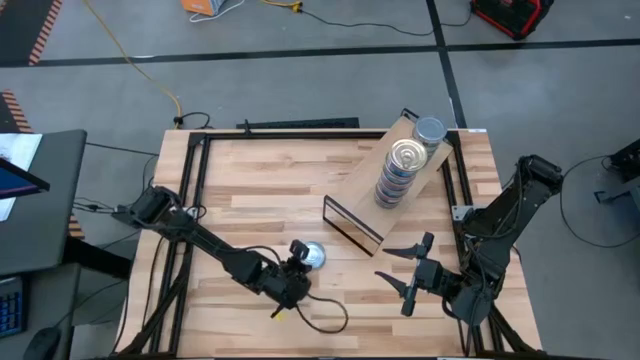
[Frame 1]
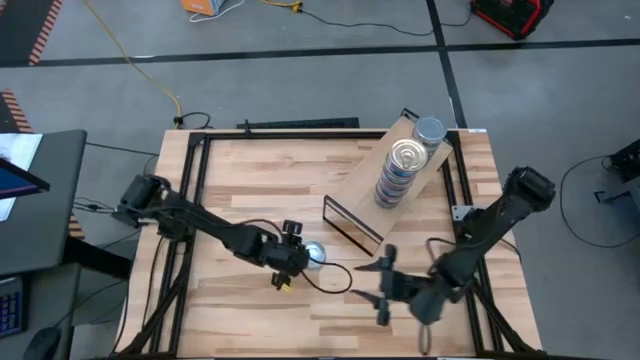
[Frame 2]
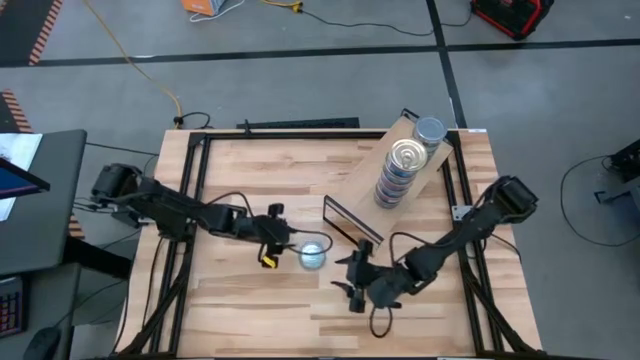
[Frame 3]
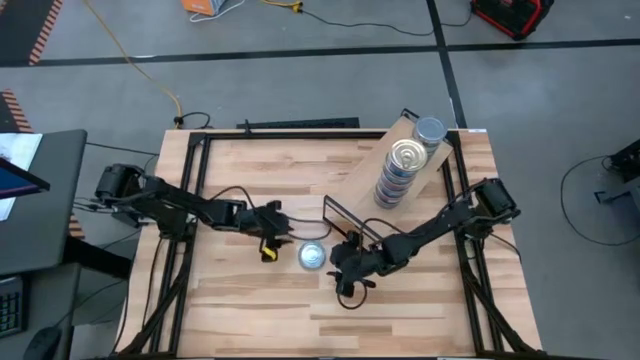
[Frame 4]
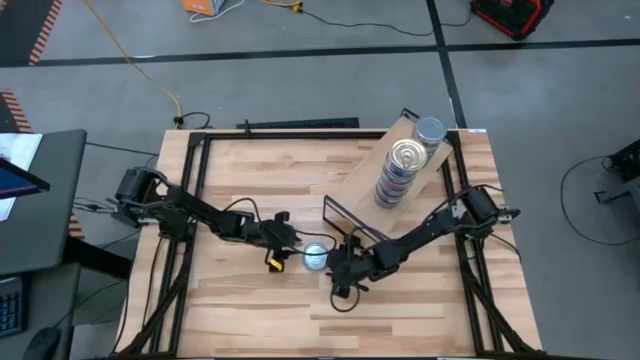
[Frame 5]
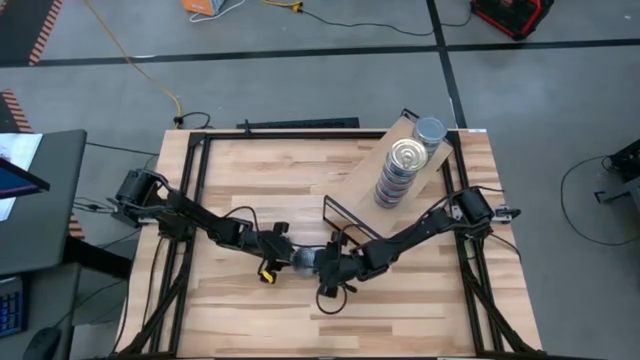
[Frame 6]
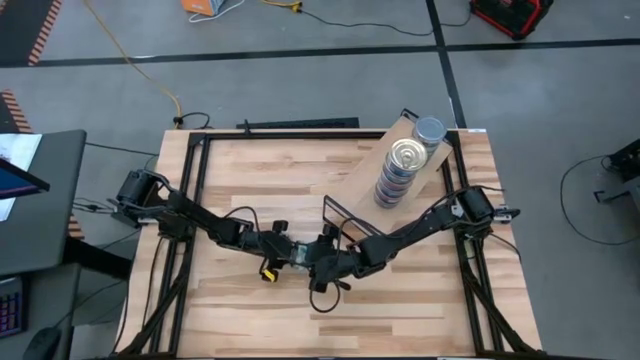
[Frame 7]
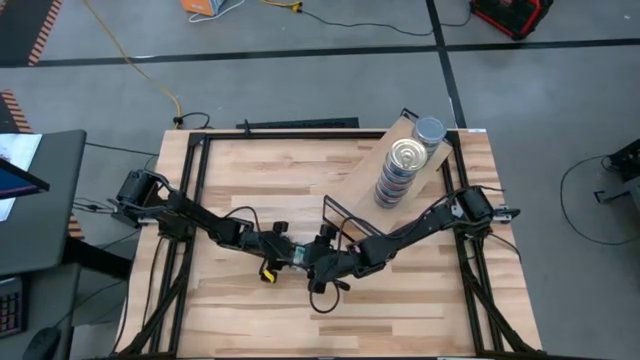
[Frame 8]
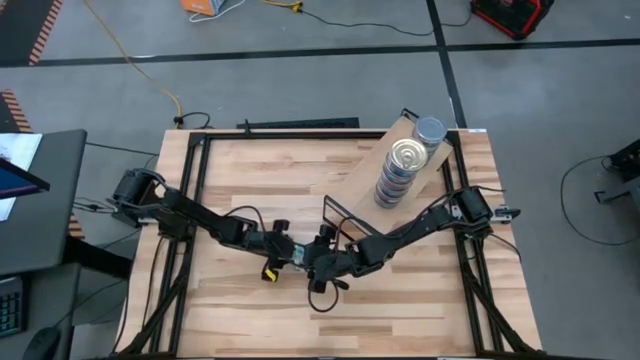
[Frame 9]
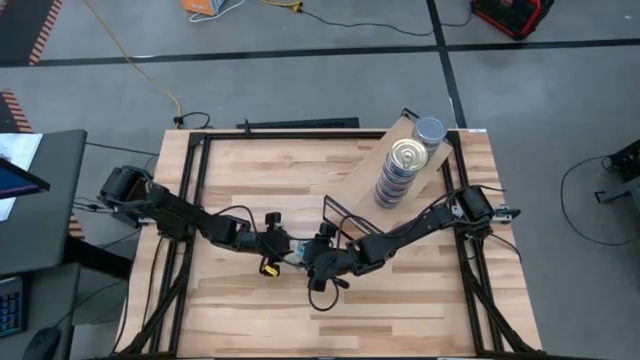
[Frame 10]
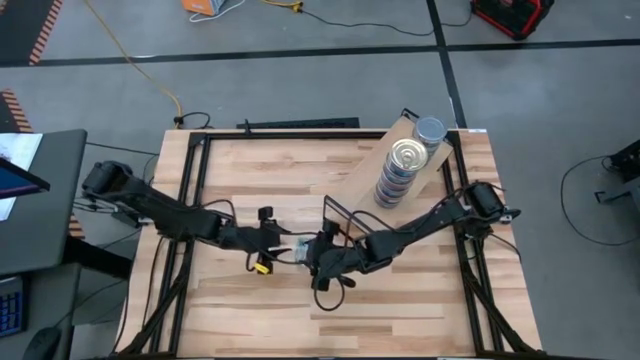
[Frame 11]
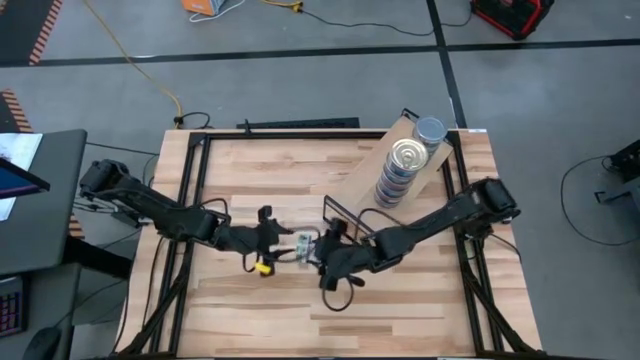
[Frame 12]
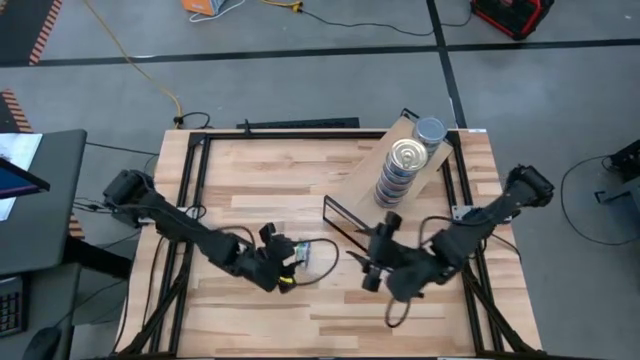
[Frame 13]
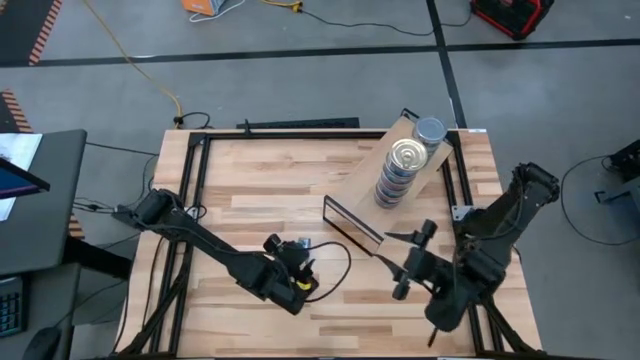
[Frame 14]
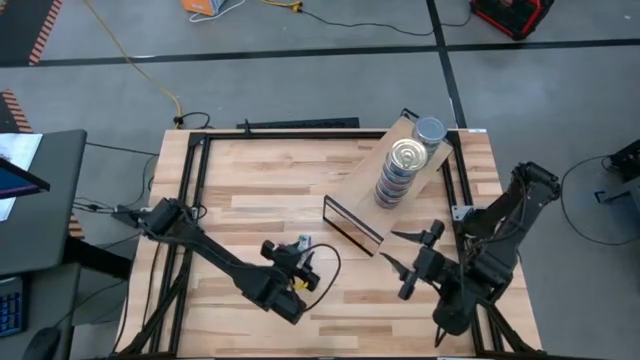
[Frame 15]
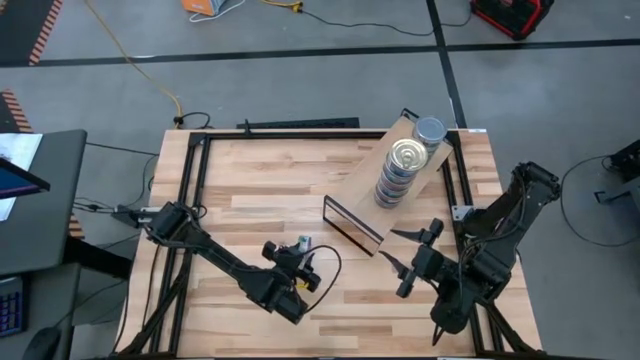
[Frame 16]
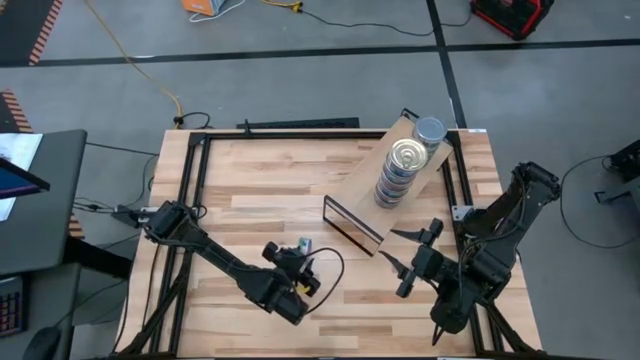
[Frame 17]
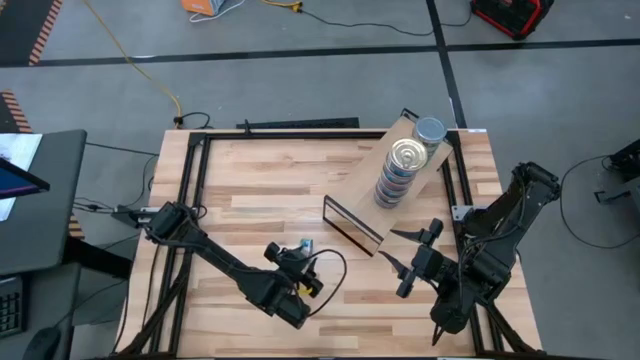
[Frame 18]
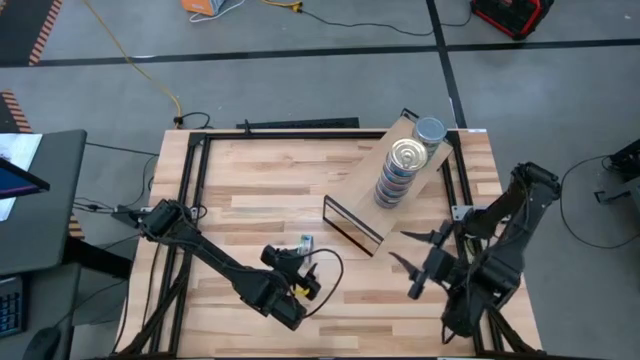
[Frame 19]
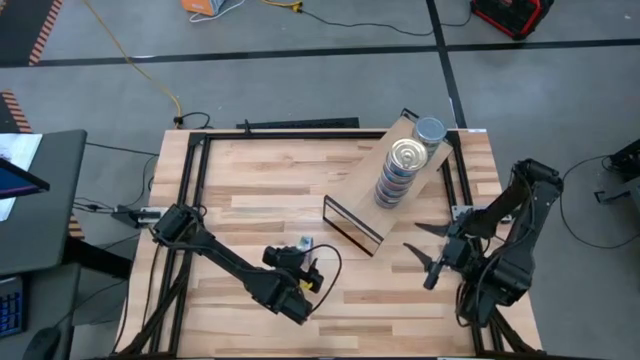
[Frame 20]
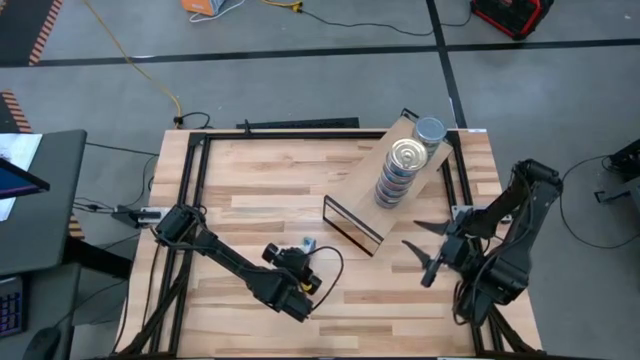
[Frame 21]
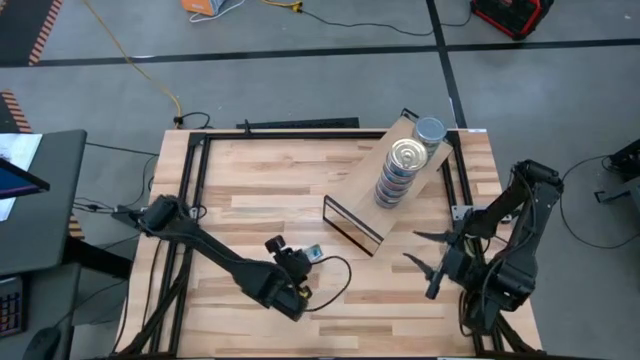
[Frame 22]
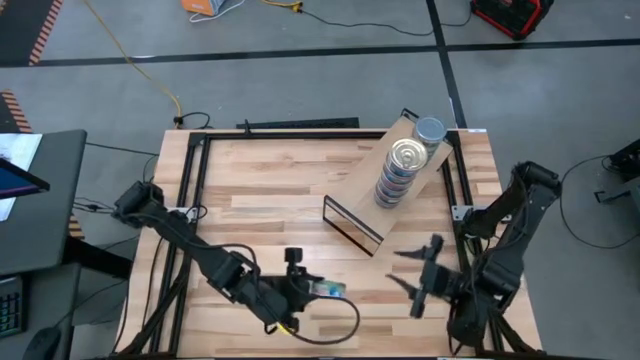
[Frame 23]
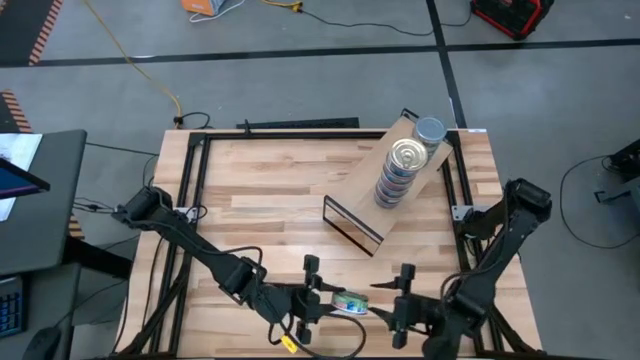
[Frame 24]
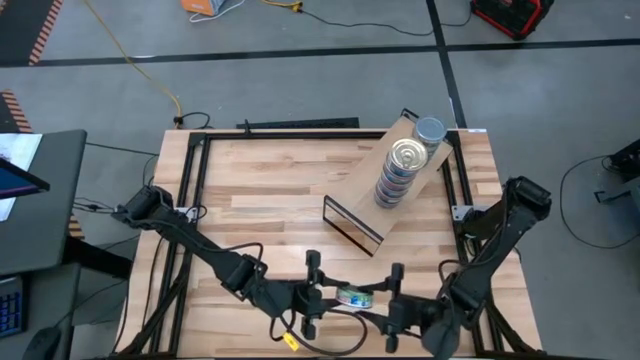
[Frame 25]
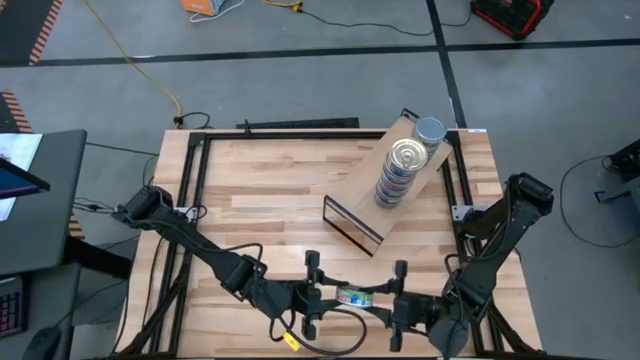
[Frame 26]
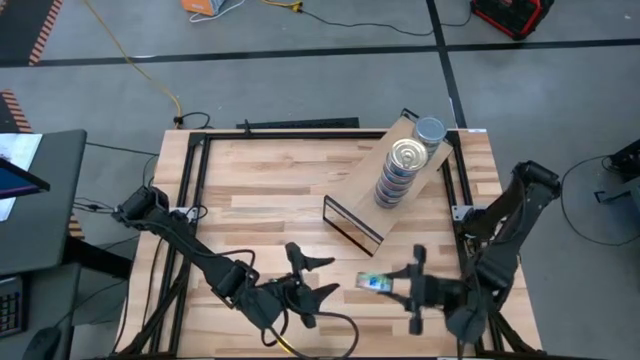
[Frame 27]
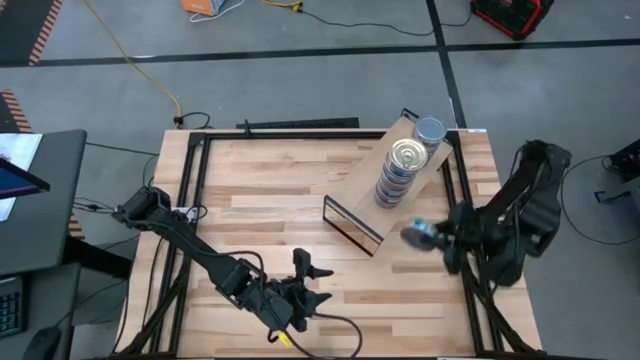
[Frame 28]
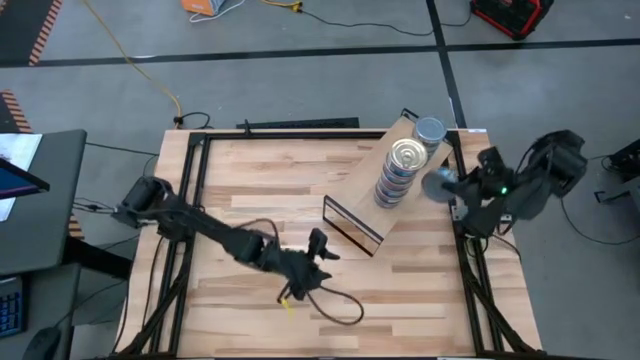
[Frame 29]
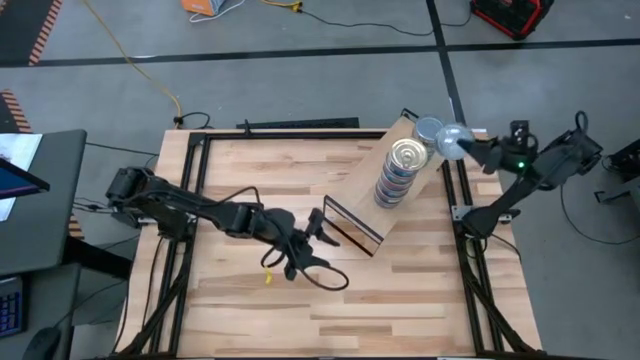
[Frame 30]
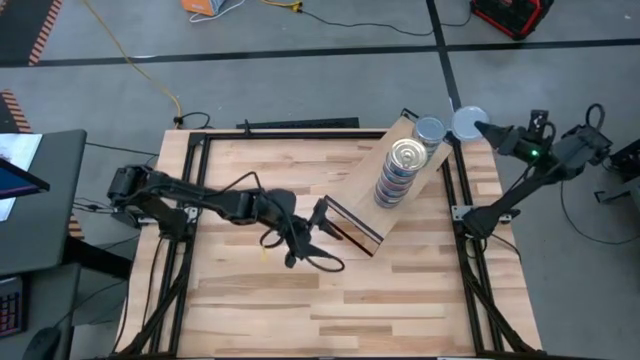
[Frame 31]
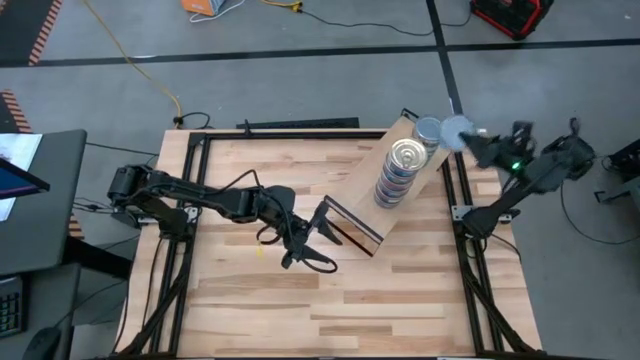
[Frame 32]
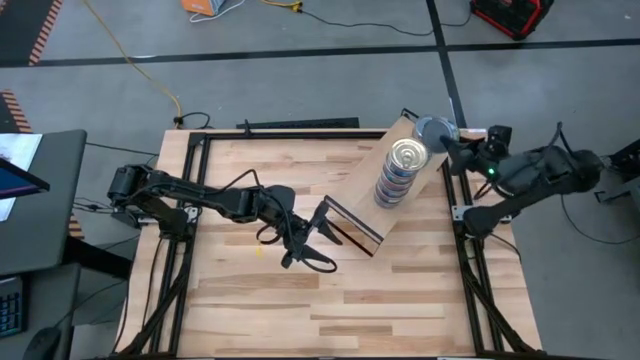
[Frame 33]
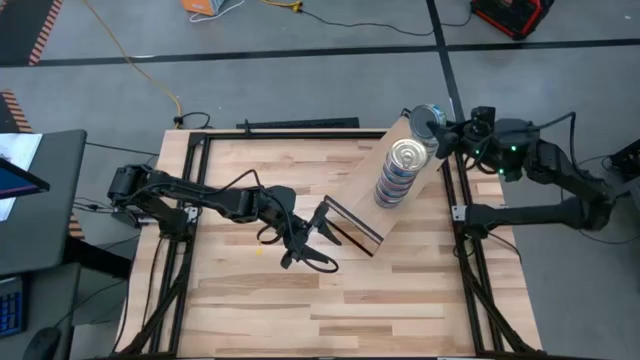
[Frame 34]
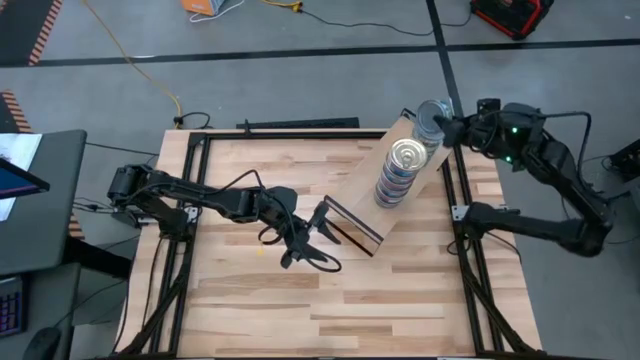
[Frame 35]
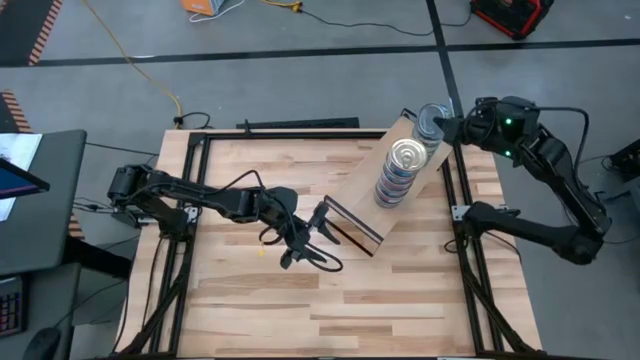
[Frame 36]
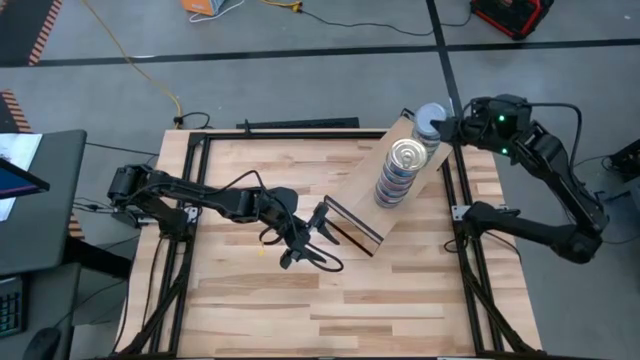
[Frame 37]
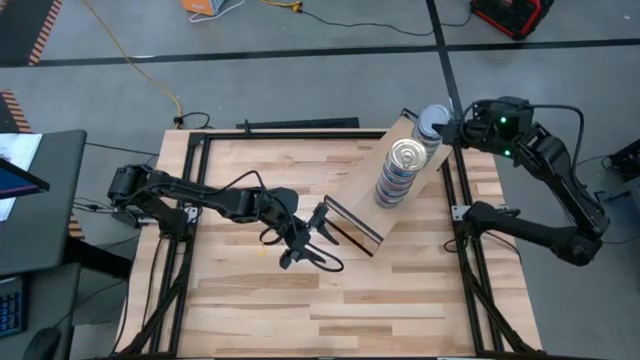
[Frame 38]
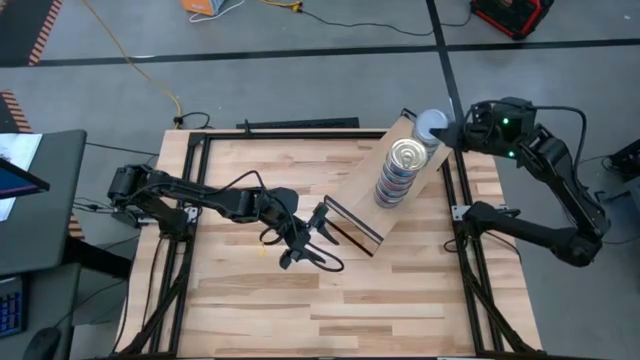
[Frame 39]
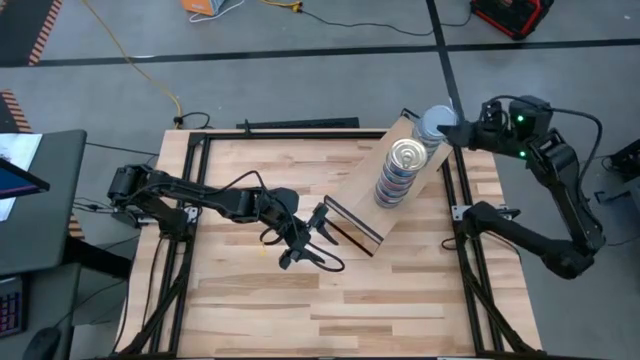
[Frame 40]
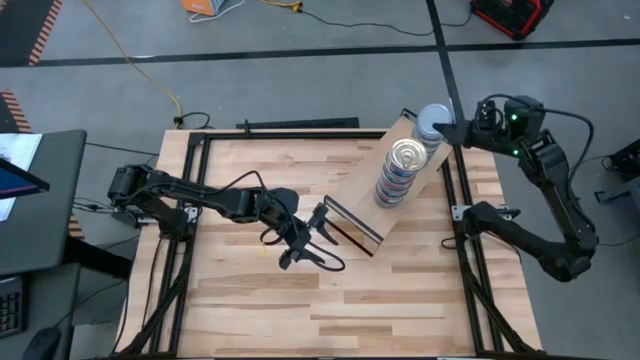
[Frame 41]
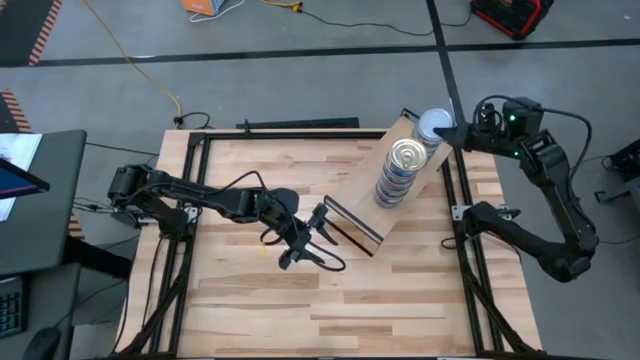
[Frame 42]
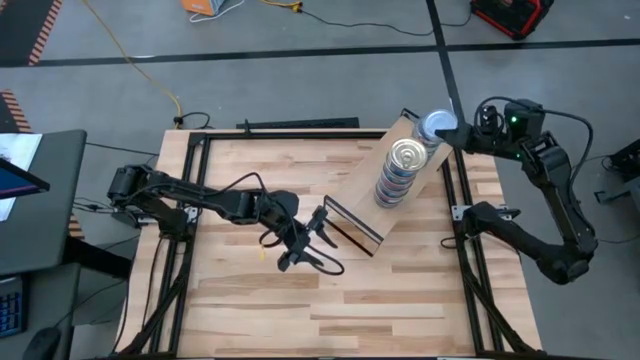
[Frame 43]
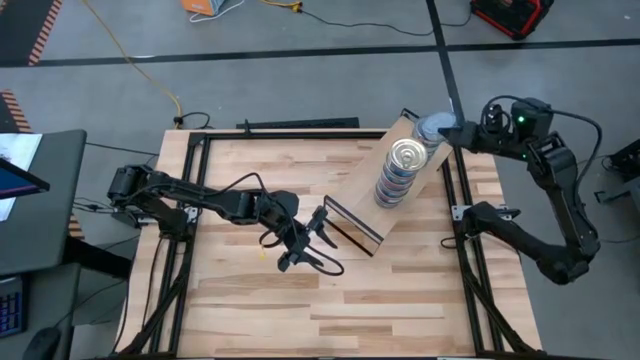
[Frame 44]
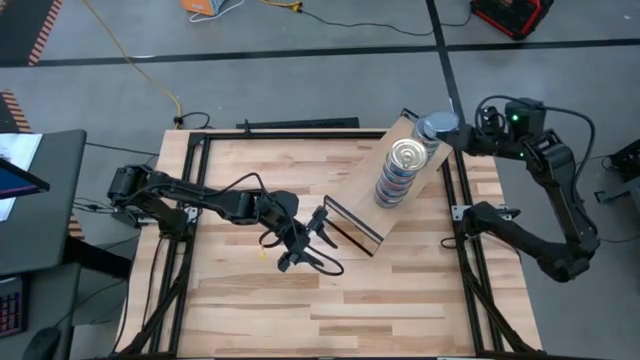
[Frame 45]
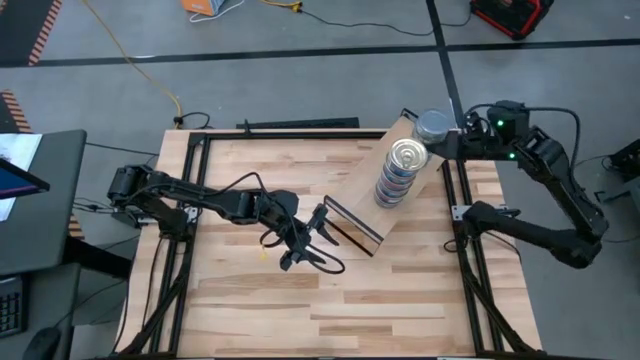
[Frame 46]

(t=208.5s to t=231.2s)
Task: Stack canned seafood by type on shelf
Stack the green tuna can on the shelf
